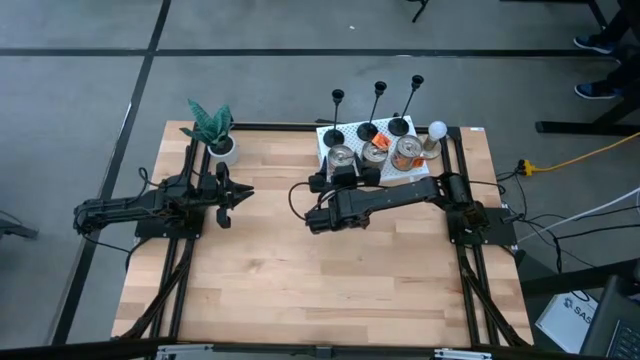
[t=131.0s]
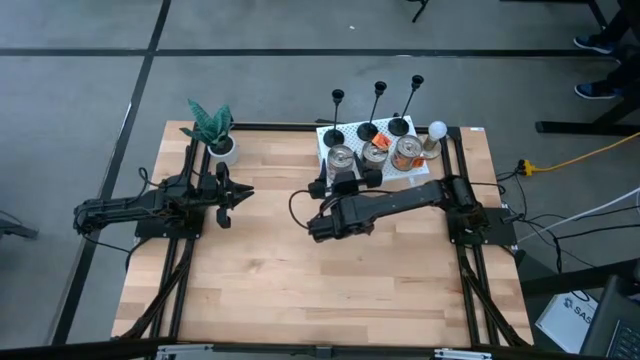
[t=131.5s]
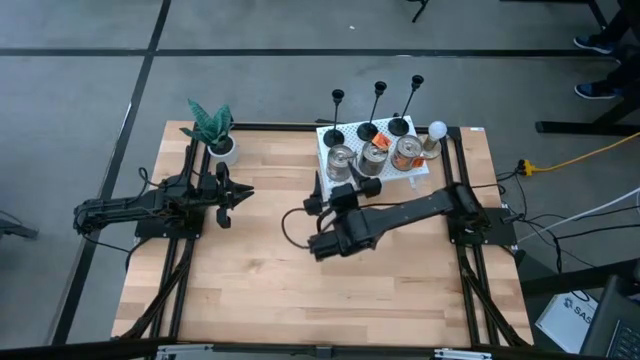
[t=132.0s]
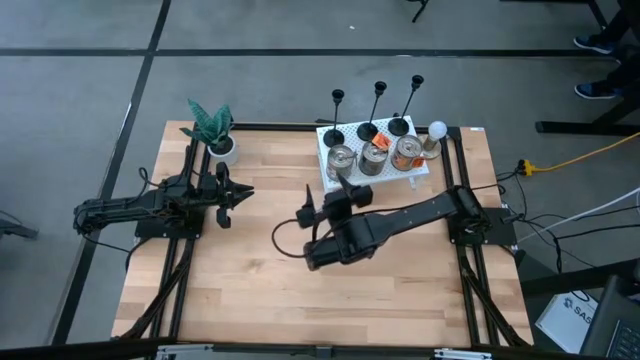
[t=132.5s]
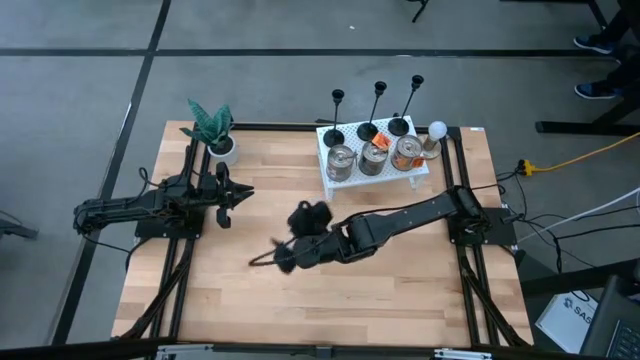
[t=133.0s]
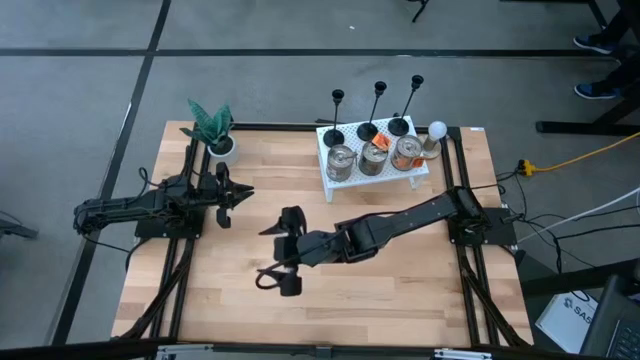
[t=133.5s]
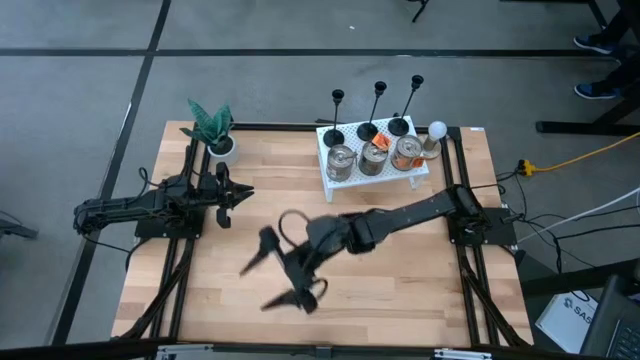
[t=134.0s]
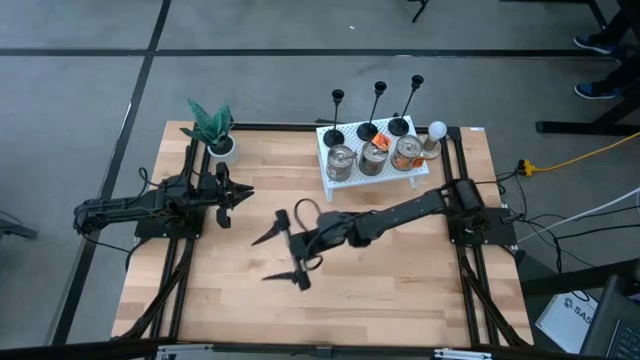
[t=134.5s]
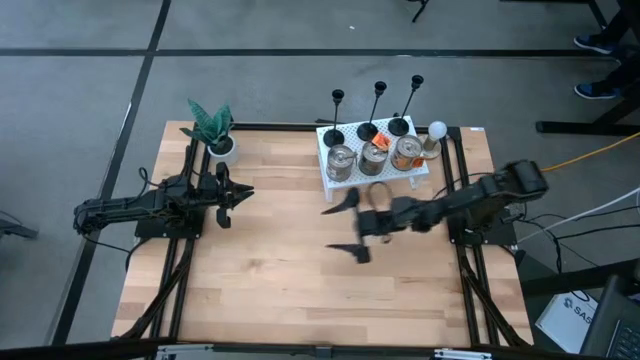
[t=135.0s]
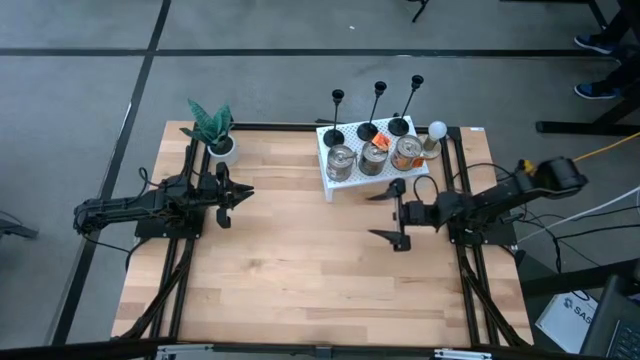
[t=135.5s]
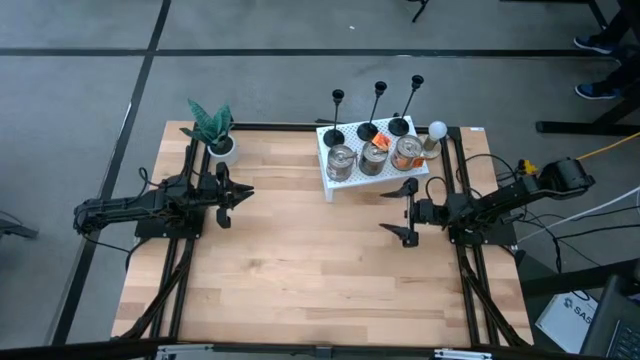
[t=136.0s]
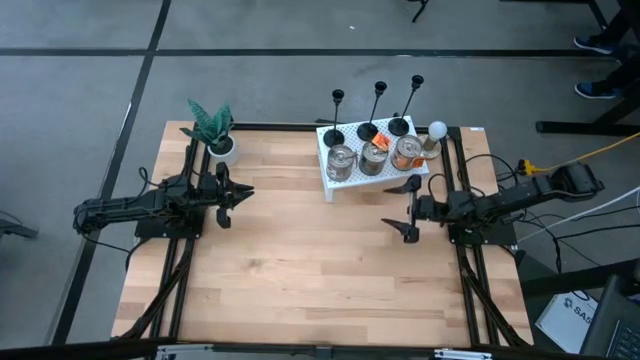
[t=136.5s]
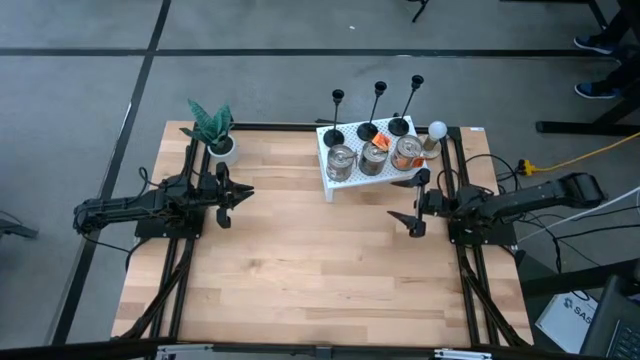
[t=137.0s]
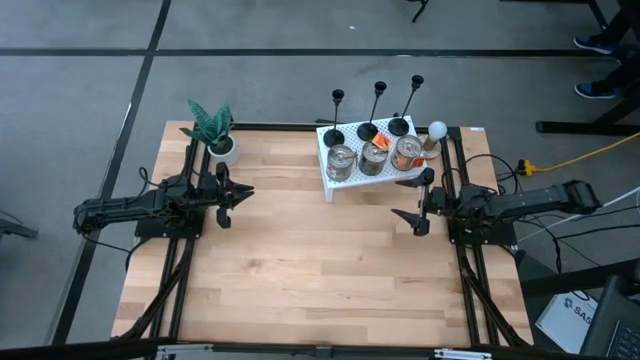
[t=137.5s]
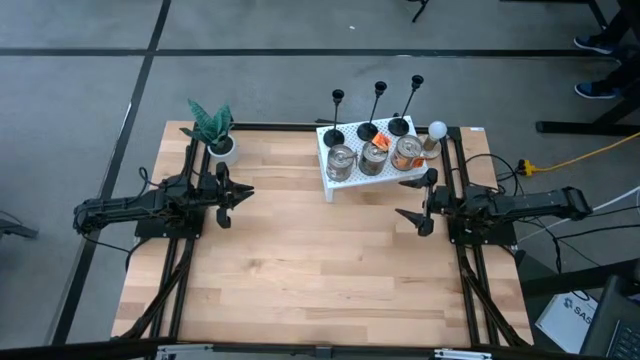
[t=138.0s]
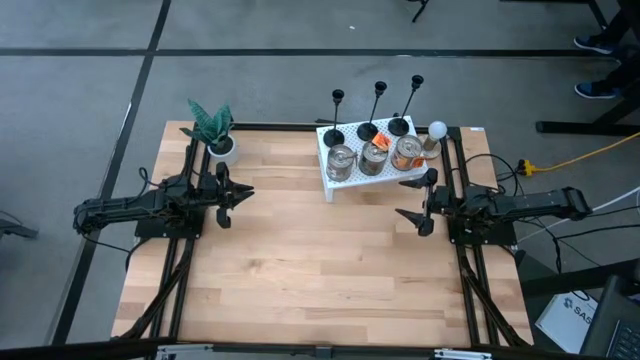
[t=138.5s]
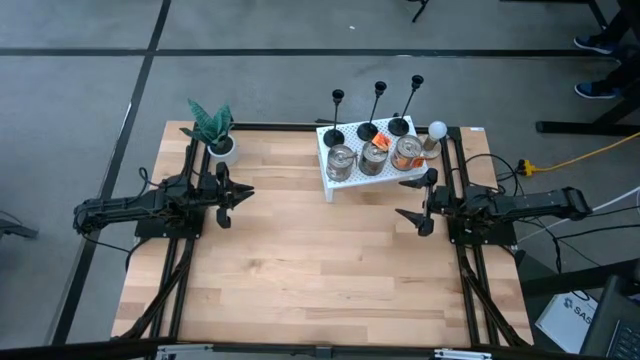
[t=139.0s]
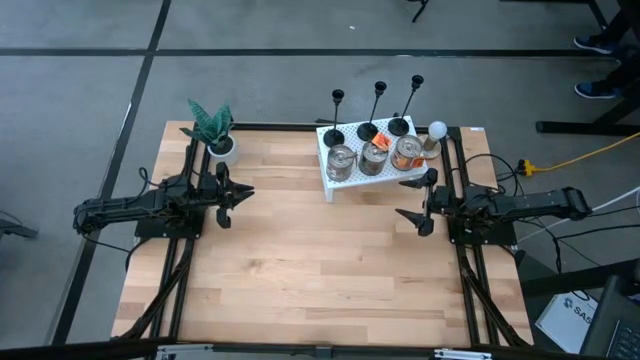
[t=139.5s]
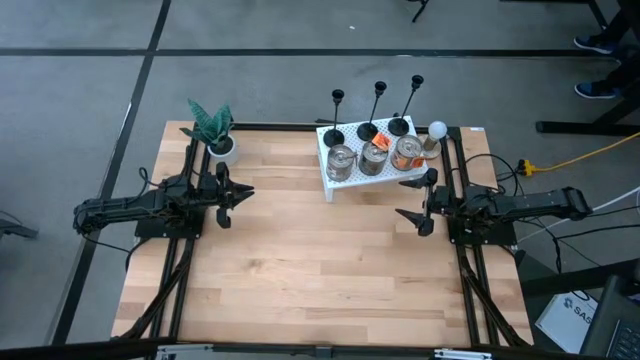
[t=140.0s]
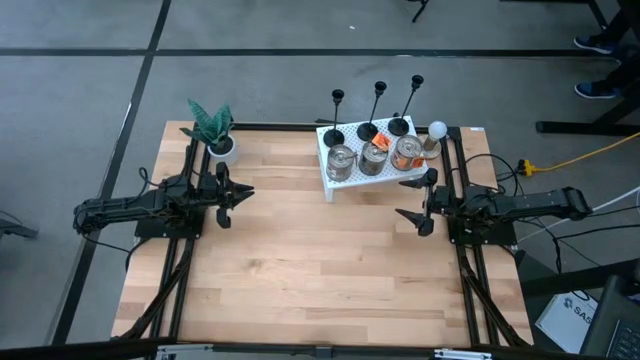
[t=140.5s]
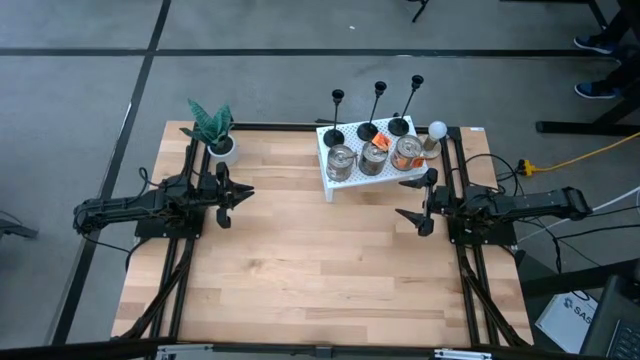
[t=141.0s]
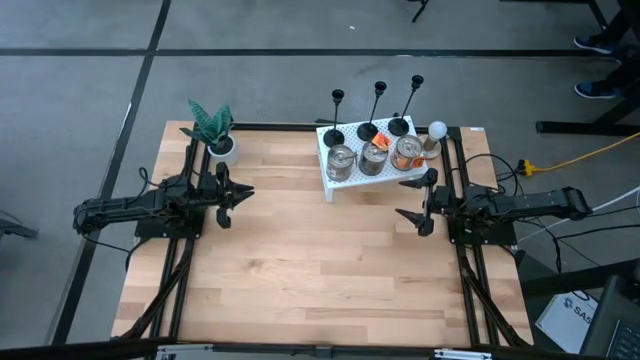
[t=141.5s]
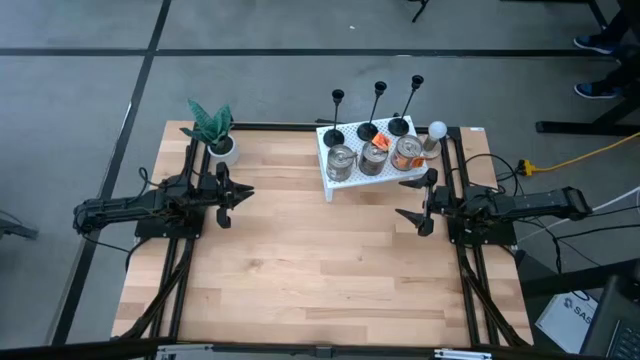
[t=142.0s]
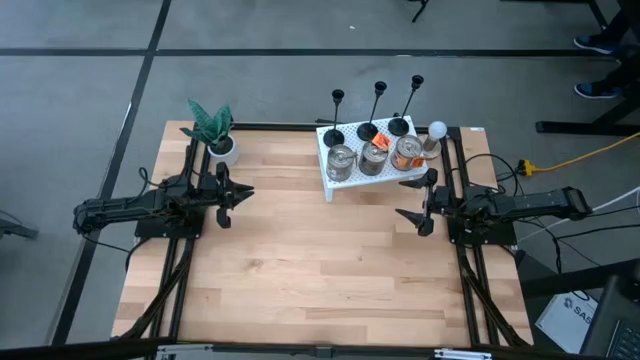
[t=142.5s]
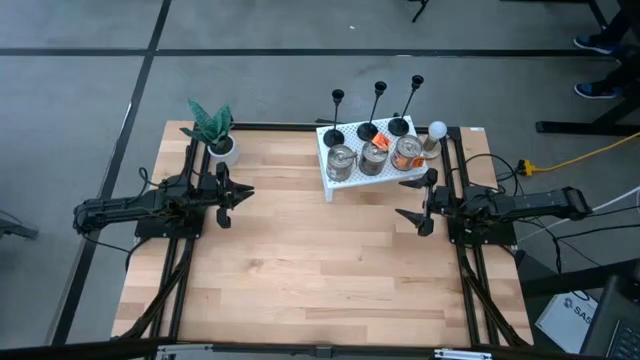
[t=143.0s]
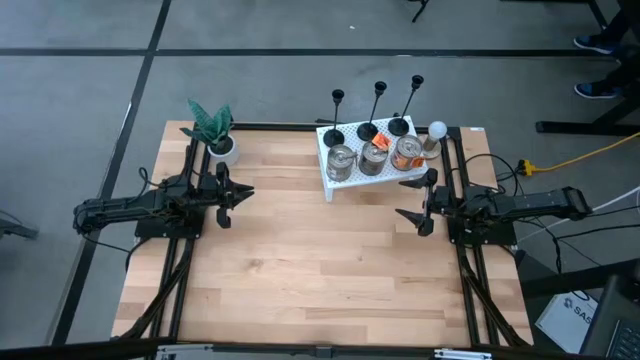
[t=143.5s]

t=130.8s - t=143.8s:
Task: Pick & Place candle stick holders
Return to Home Position

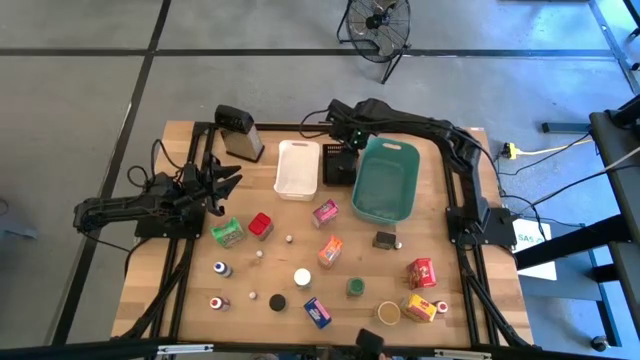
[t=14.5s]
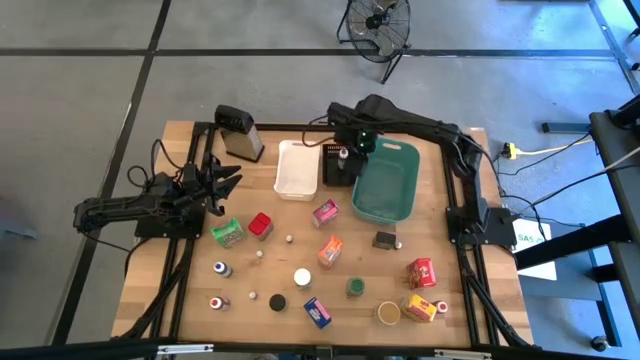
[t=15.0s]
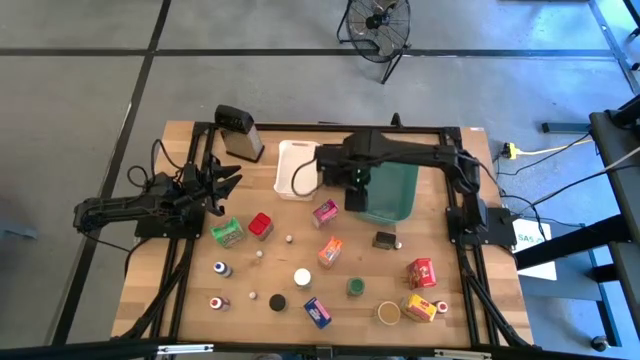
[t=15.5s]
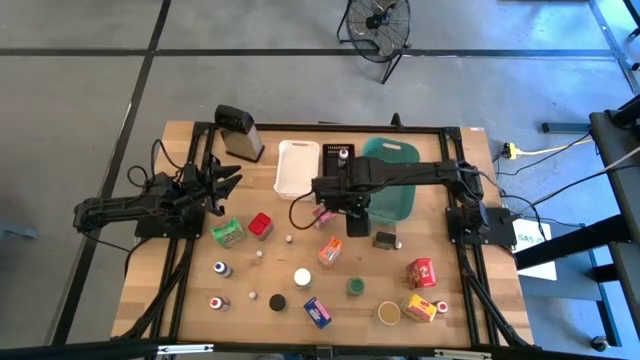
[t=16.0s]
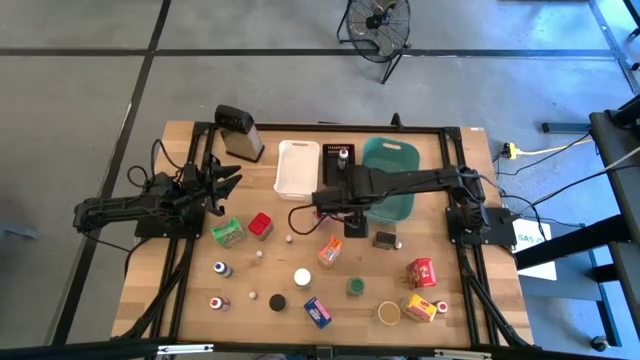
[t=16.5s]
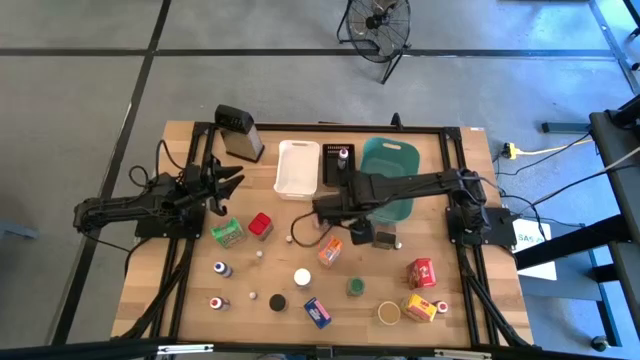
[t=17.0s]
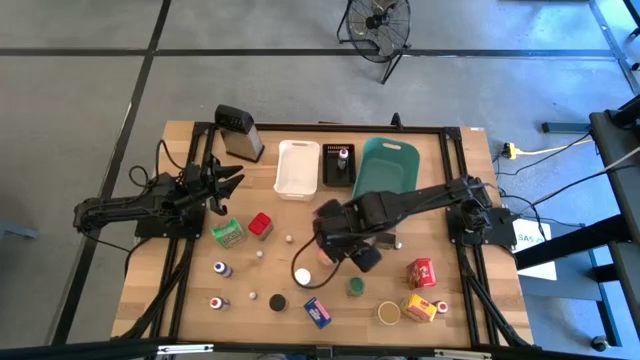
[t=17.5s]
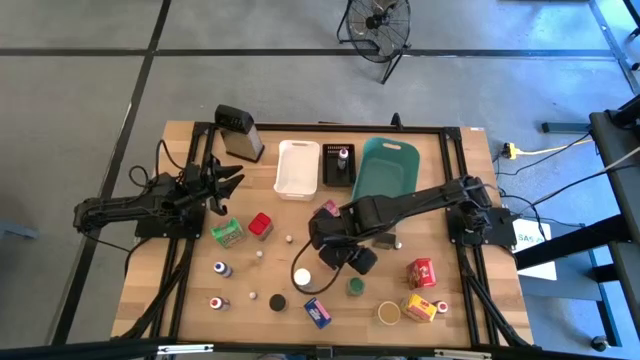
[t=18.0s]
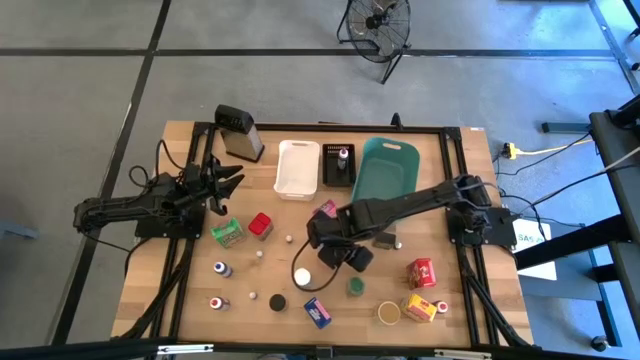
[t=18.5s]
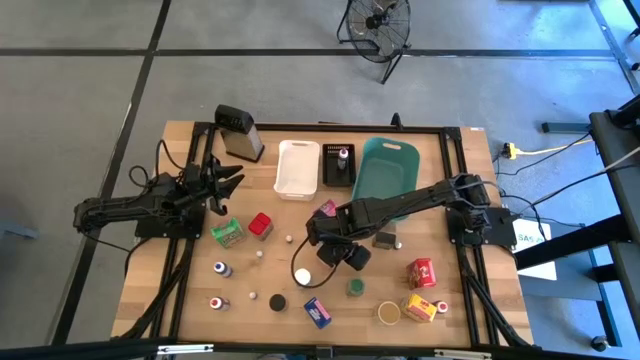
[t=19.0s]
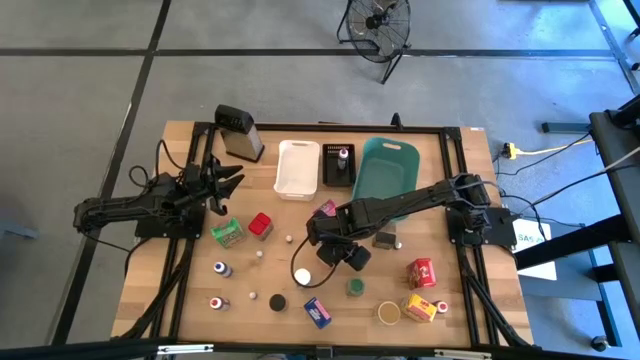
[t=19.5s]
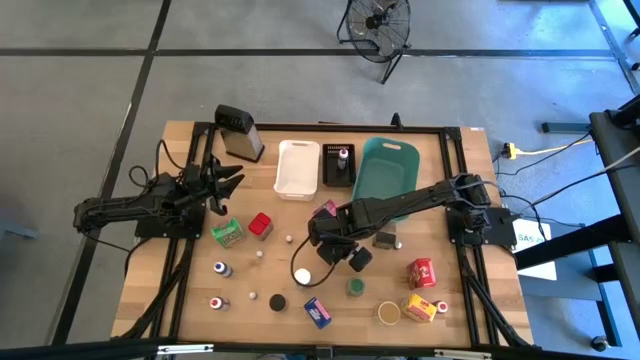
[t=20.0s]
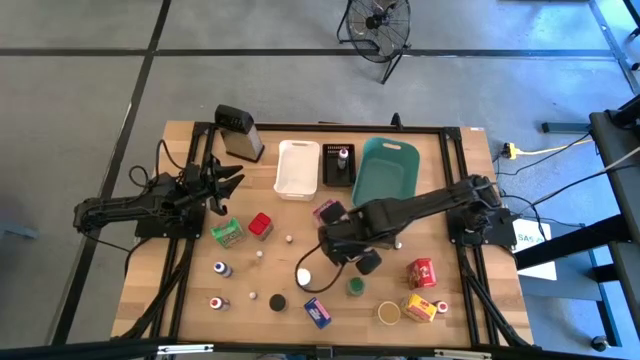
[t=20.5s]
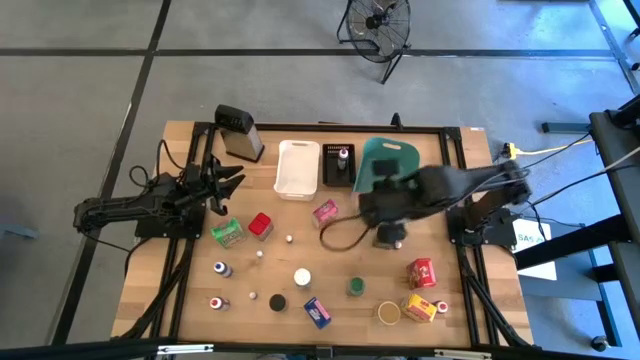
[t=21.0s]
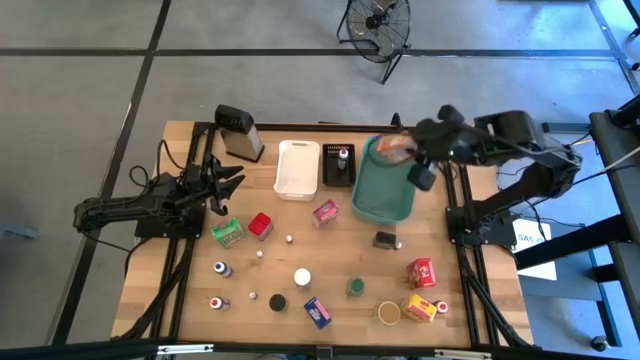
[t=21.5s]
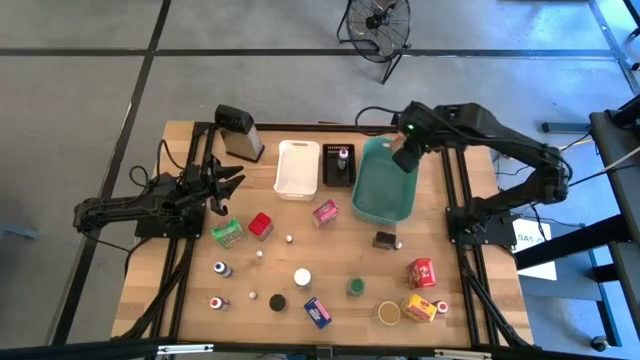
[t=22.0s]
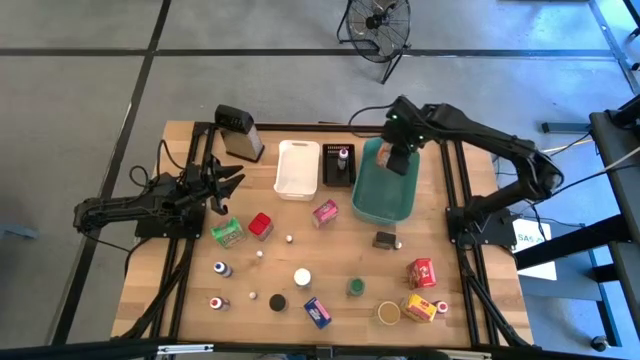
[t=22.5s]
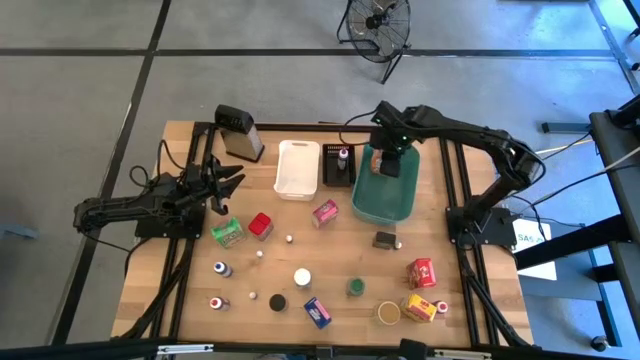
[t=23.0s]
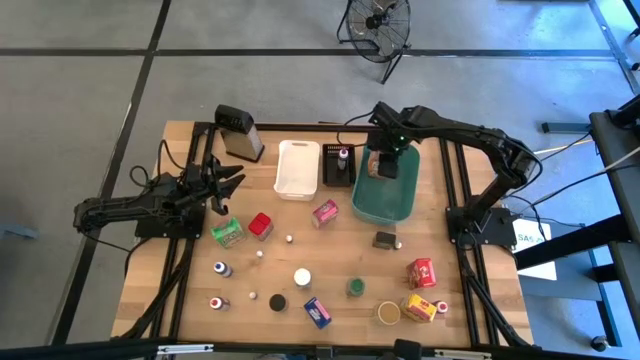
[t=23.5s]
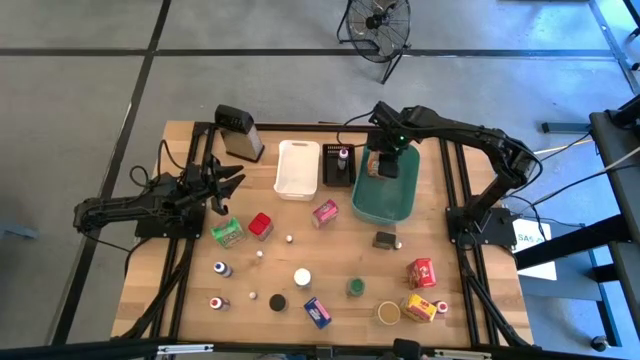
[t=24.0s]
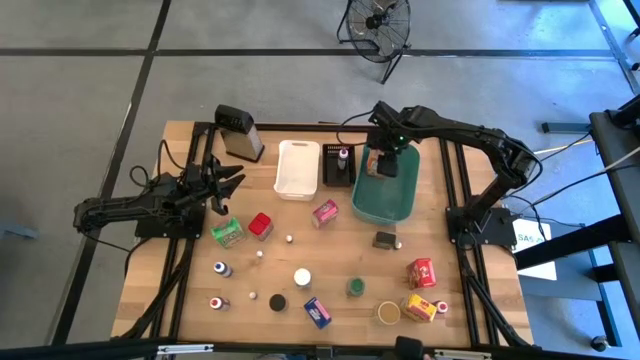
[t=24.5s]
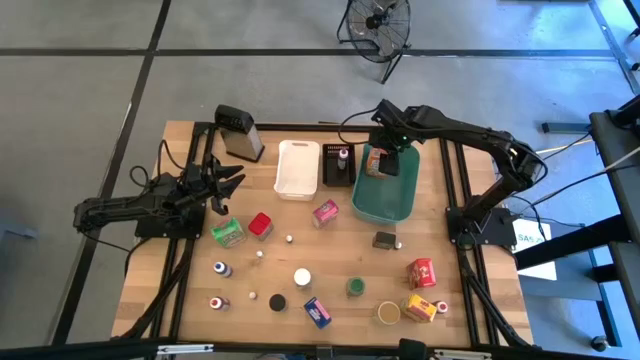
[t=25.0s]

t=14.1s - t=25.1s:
Task: Pick & Place Kitchen Items
Put the orange cereal box into the green bin
